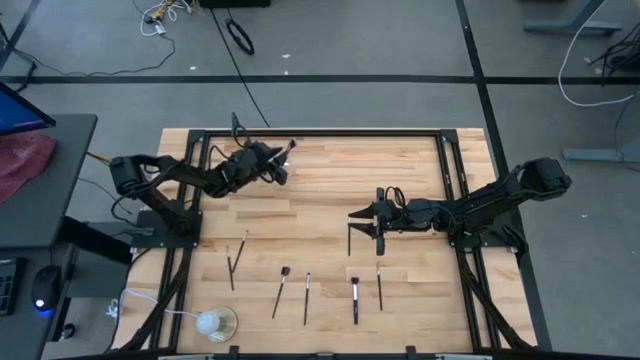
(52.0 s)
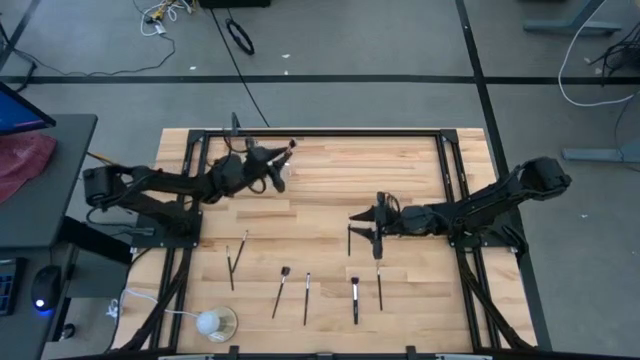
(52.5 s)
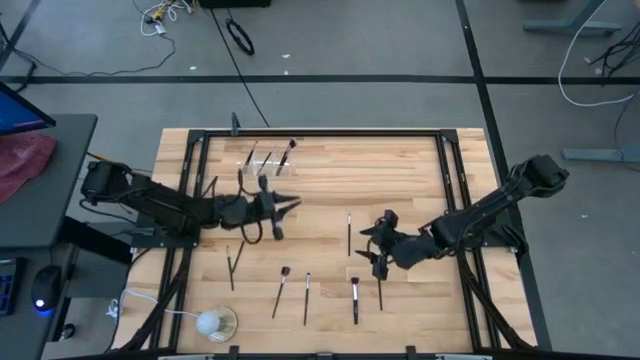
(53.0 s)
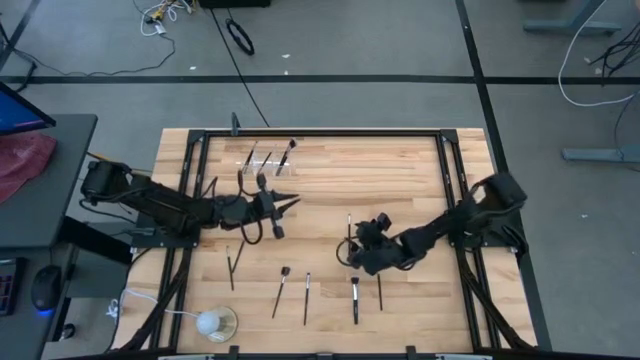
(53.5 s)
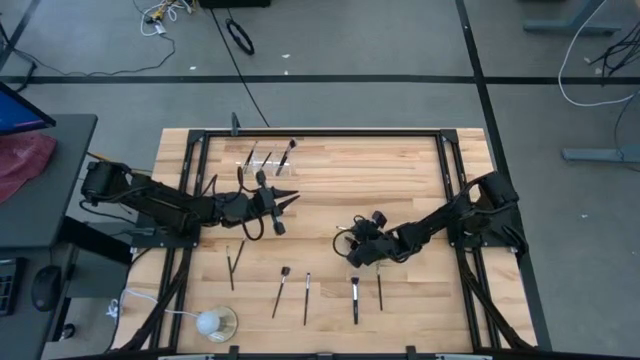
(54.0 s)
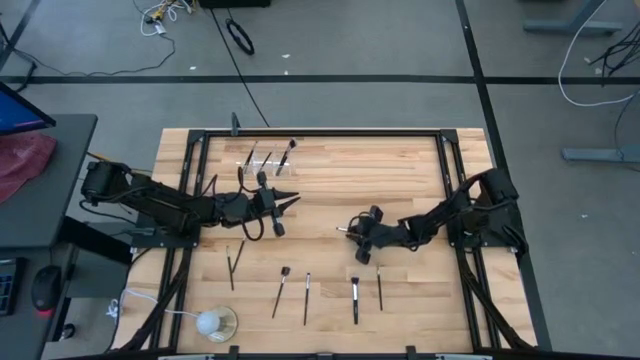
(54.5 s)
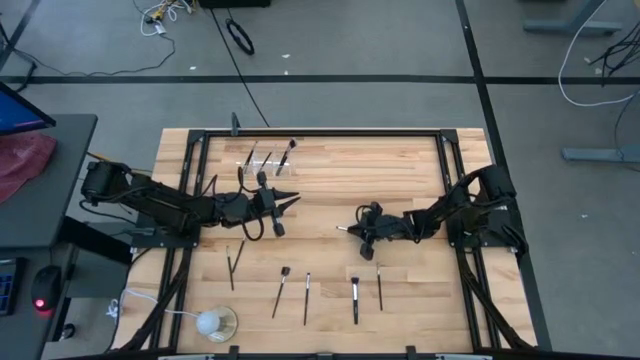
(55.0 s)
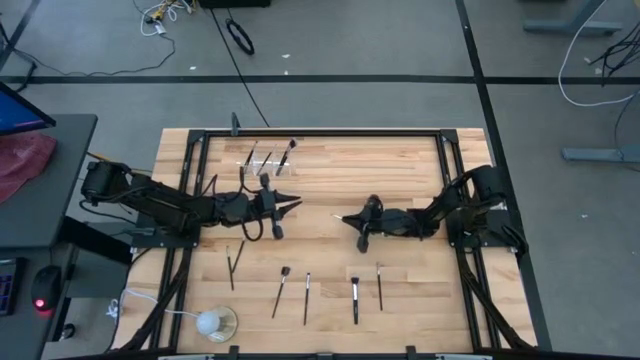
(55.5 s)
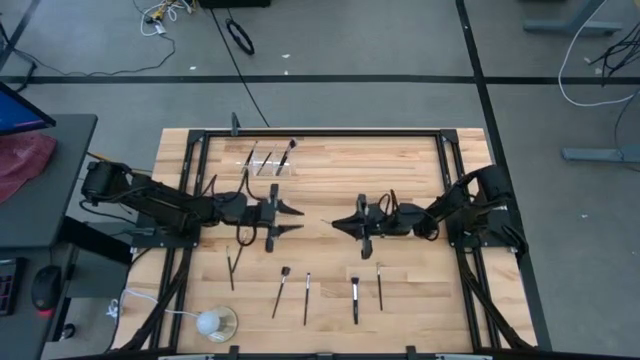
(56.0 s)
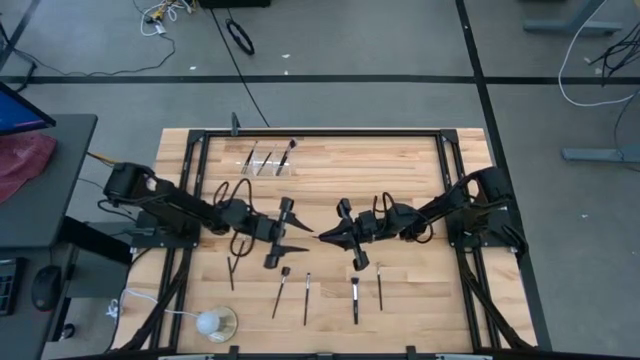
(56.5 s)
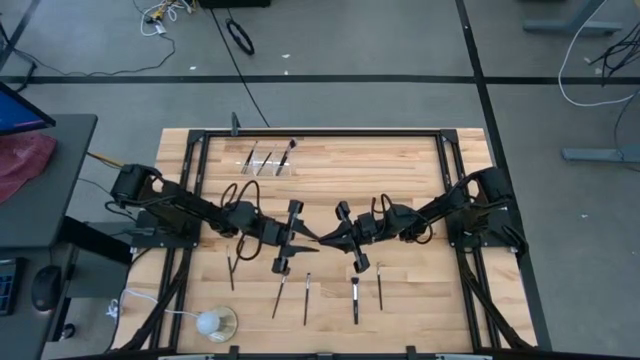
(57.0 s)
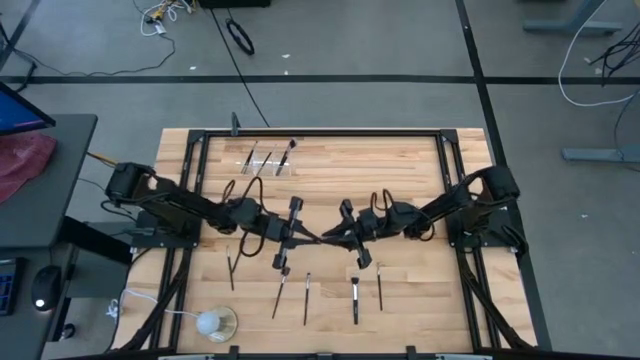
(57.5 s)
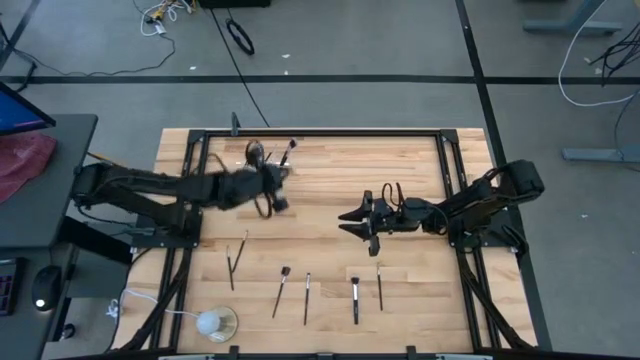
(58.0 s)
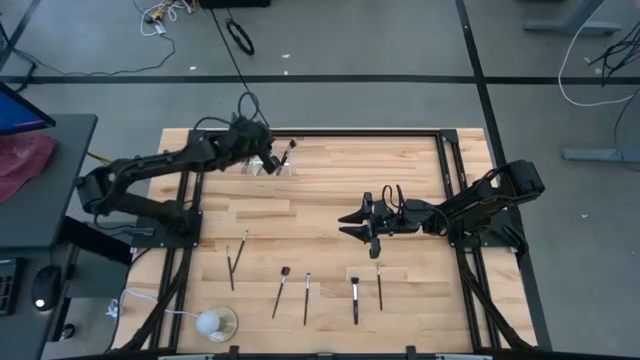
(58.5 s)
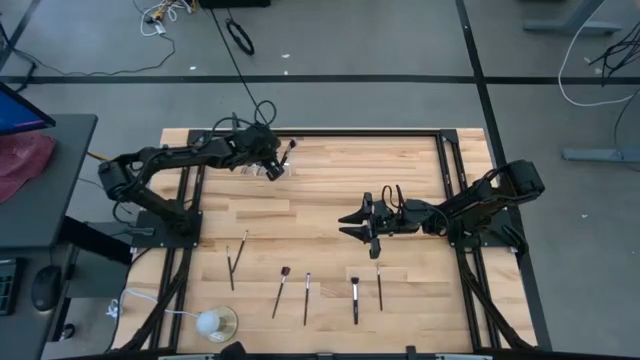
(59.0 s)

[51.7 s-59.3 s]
Task: Put items in baskets/containers
Put the eyeshadow brush into the right section of the transparent organizer

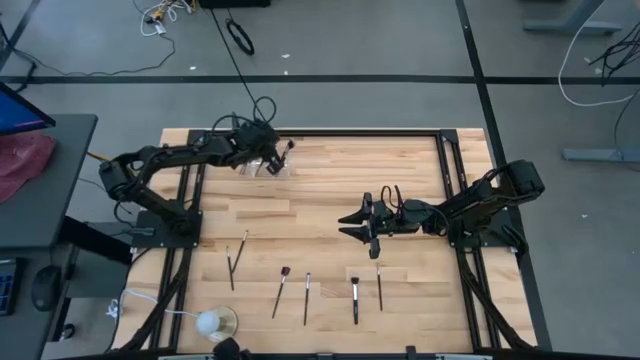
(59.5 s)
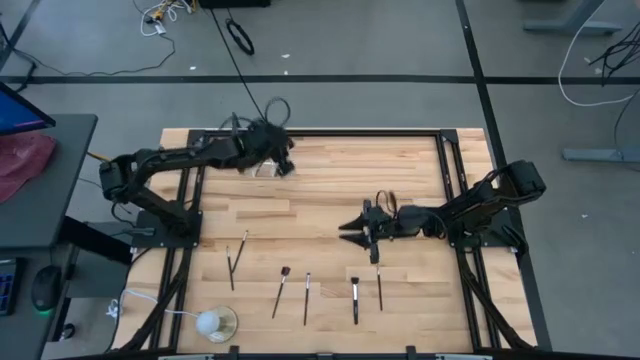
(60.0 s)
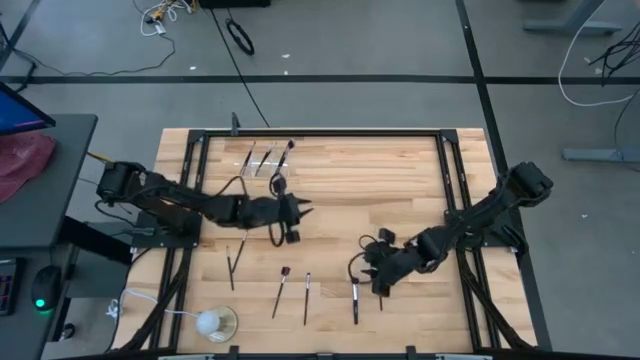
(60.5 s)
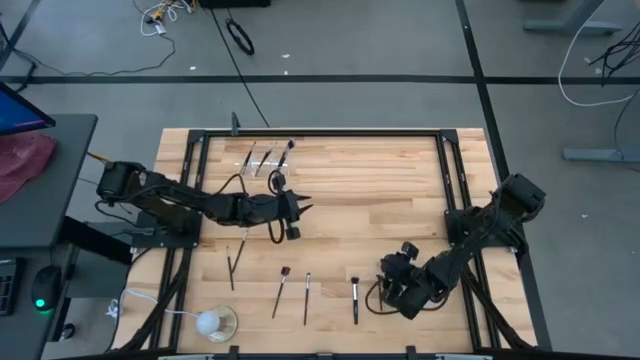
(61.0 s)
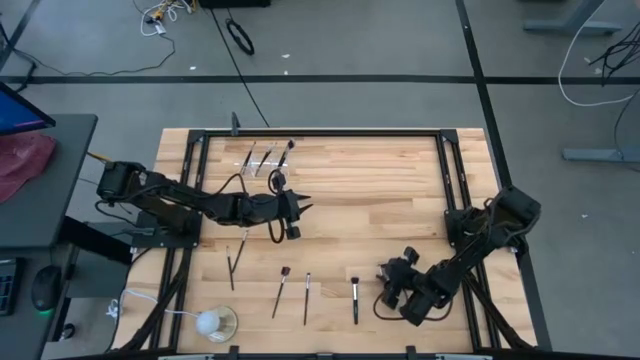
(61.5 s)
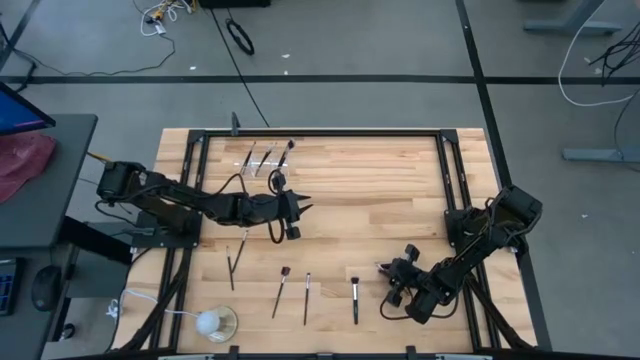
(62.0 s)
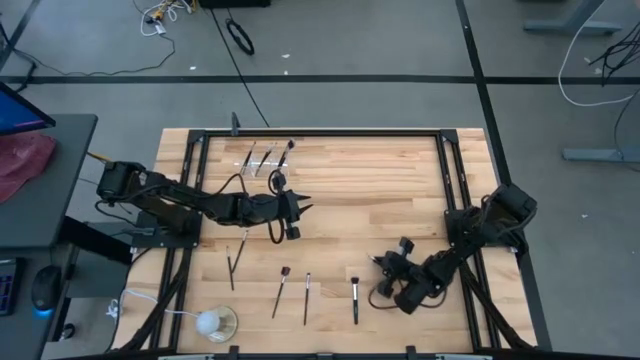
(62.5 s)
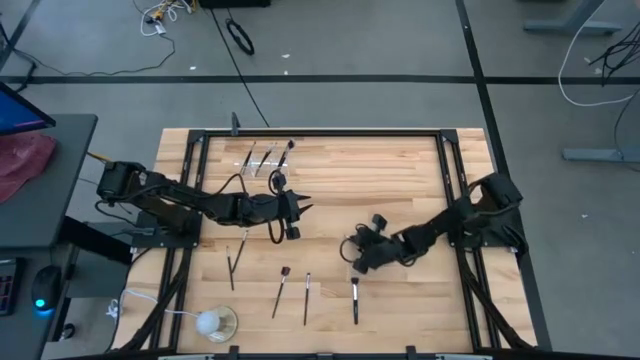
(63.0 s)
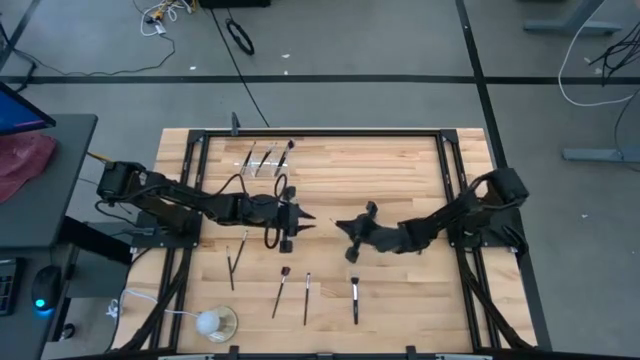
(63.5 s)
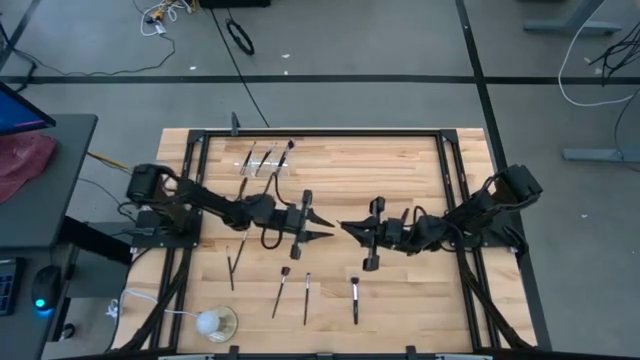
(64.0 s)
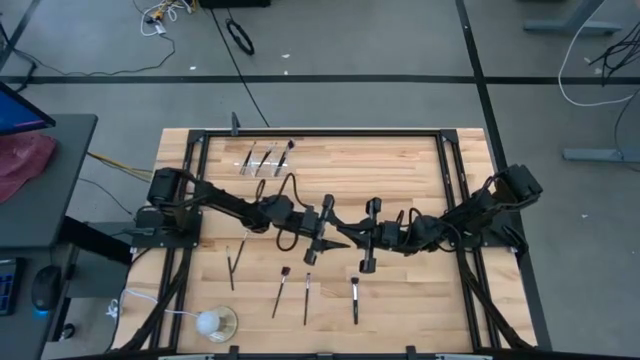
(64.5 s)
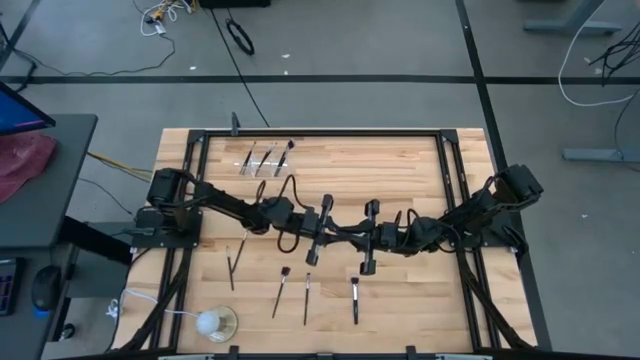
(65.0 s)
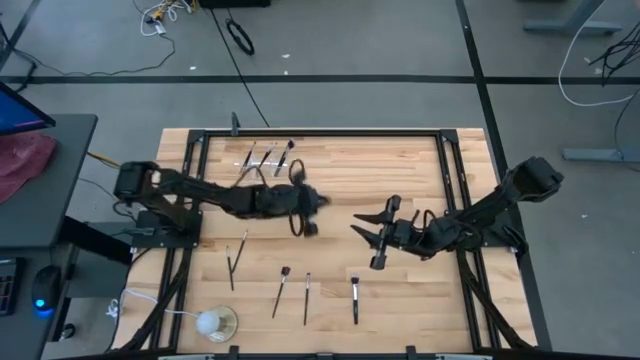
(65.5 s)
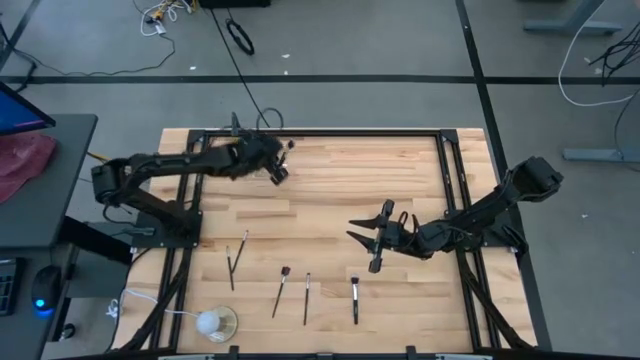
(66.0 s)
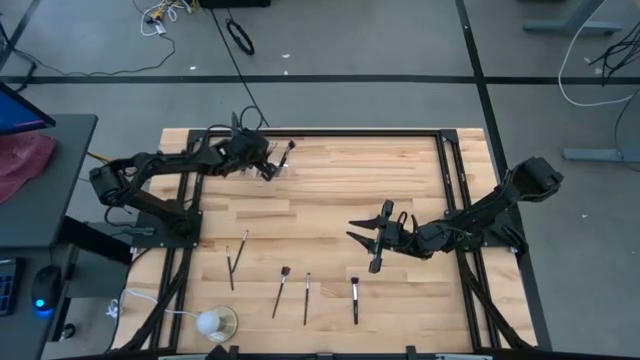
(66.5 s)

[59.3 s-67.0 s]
Put the eyeshadow brush into the right section of the transparent organizer

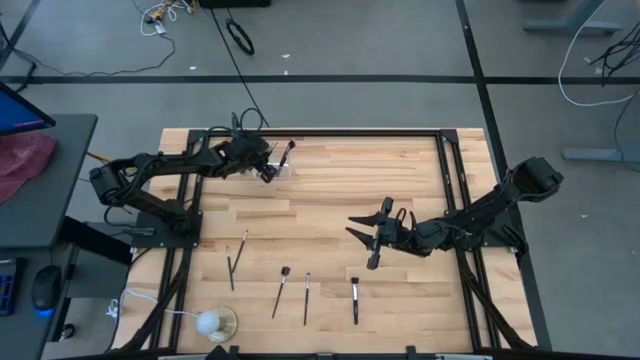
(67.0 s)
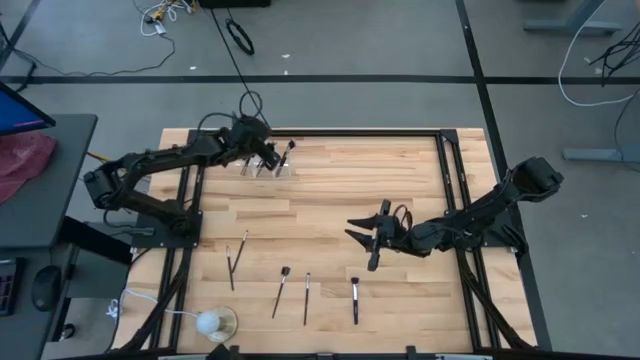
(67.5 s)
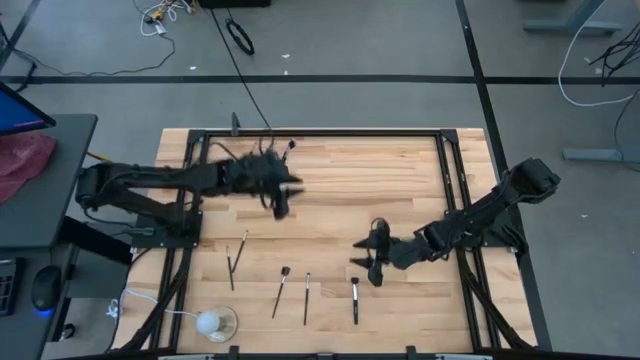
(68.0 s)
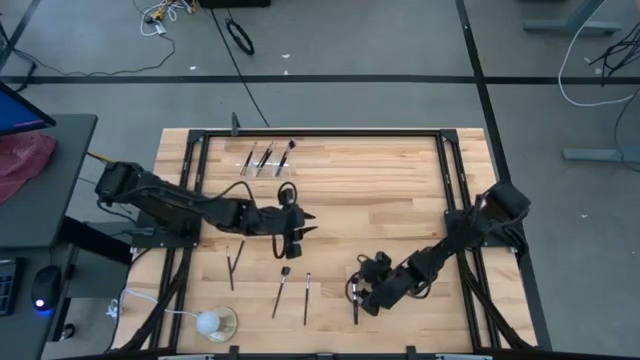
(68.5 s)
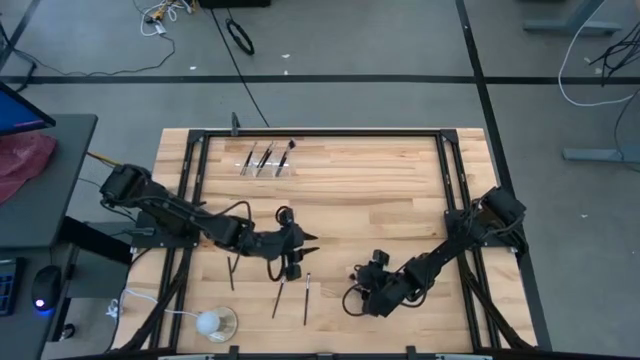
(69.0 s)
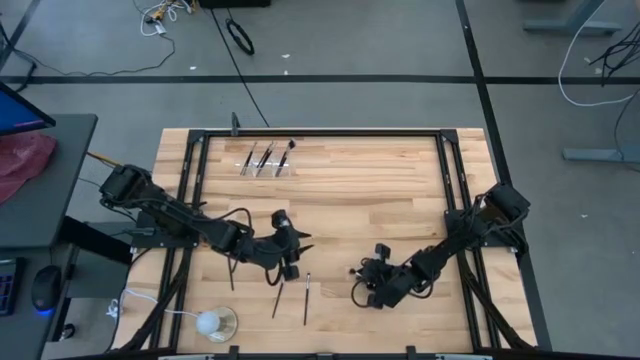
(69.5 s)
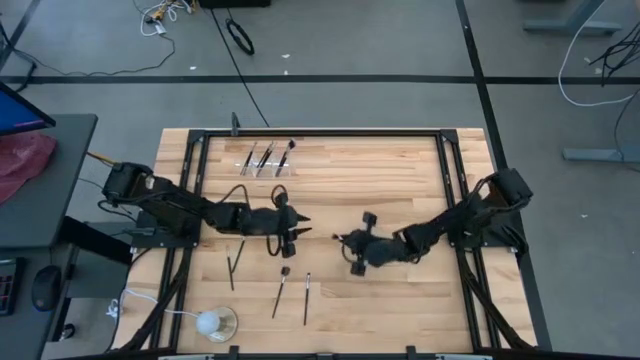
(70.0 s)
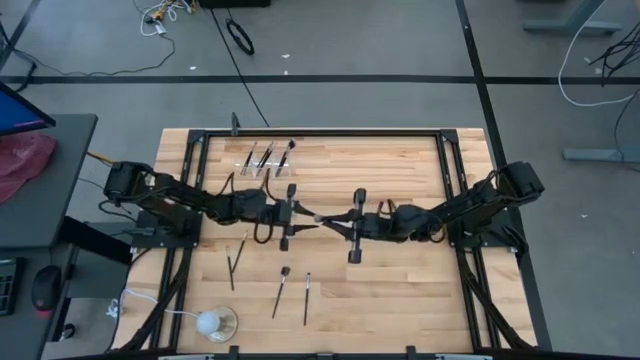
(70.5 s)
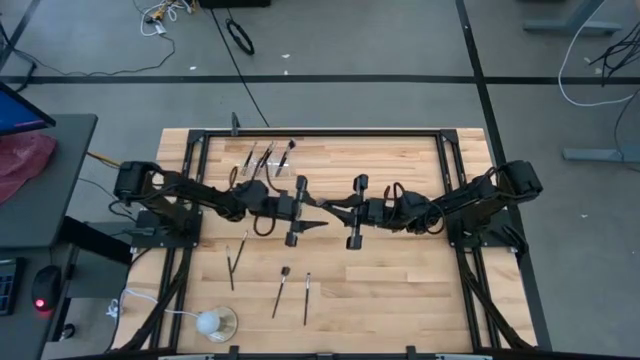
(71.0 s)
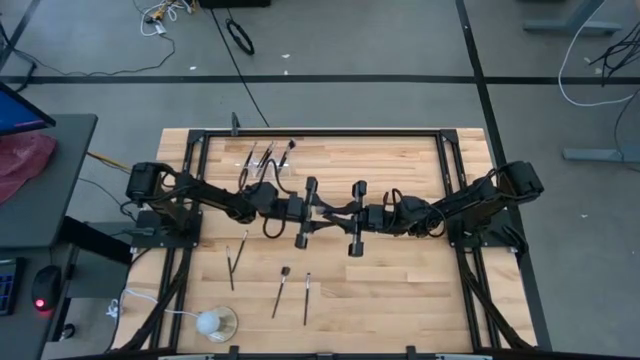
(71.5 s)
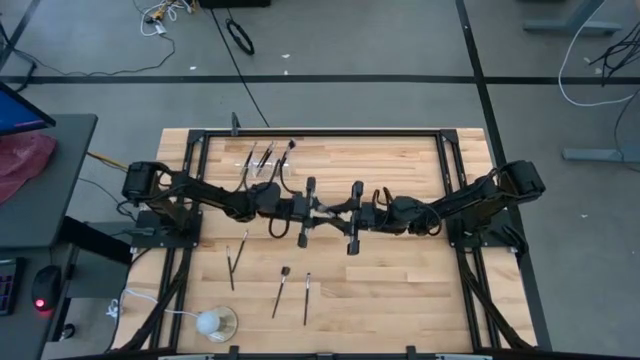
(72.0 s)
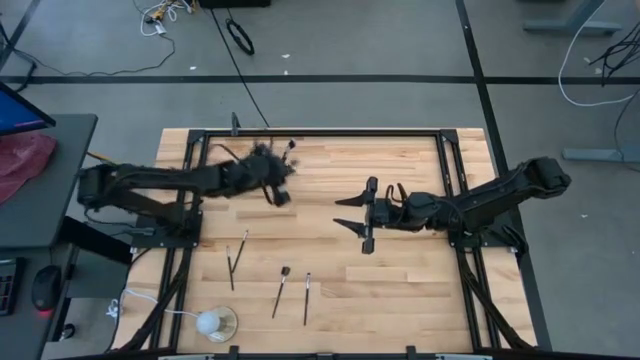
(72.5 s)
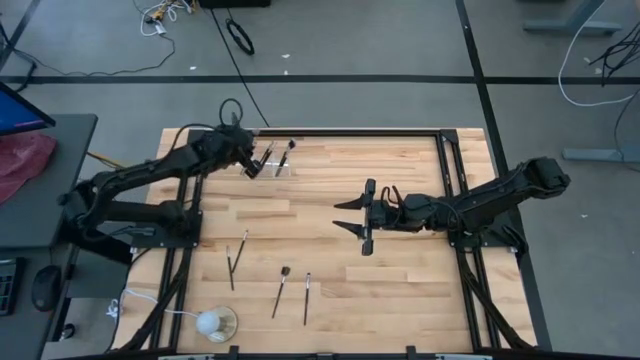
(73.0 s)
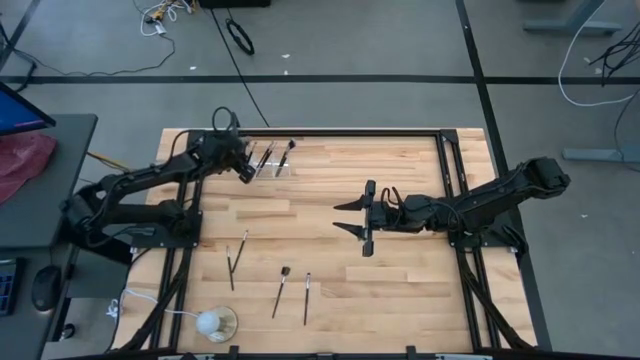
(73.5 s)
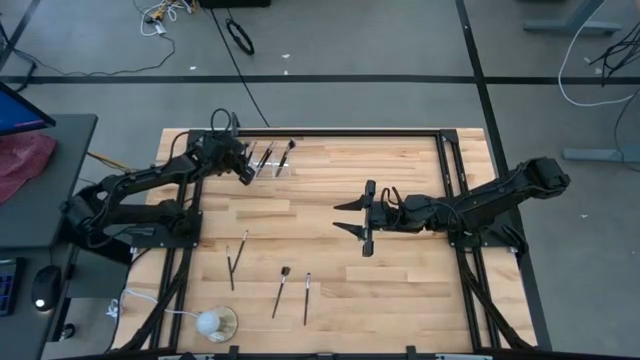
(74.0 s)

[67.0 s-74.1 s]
Put the blush brush into the left section of the transparent organizer
